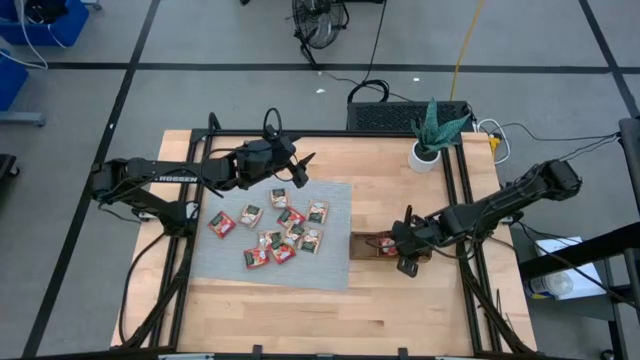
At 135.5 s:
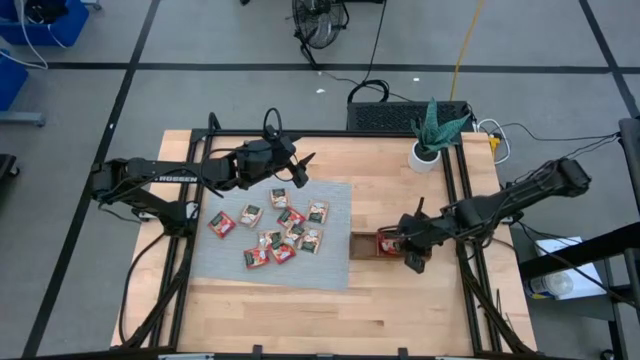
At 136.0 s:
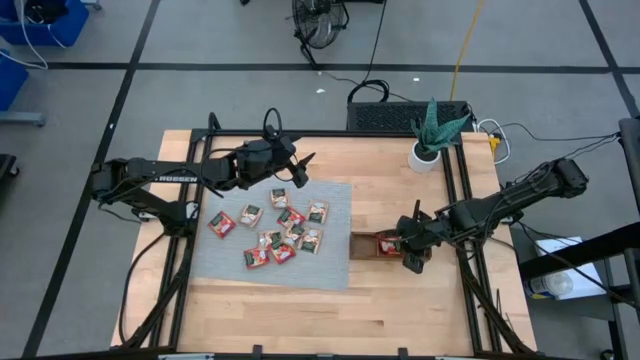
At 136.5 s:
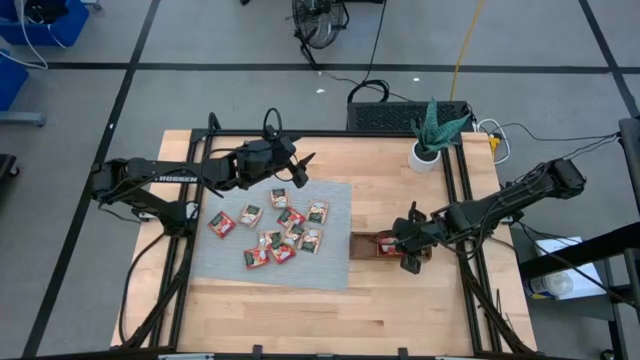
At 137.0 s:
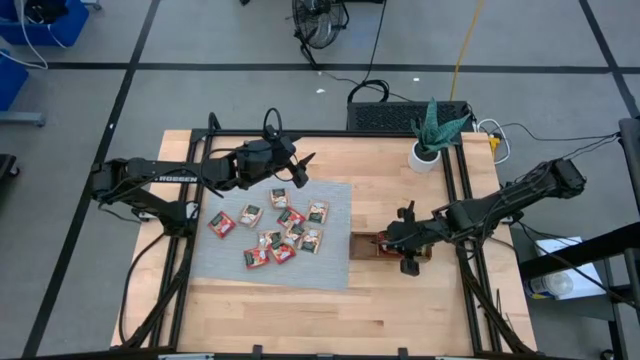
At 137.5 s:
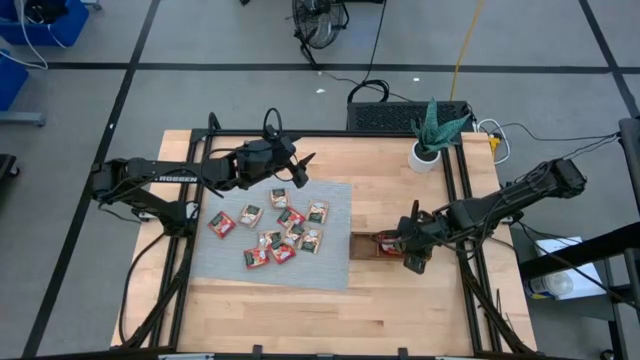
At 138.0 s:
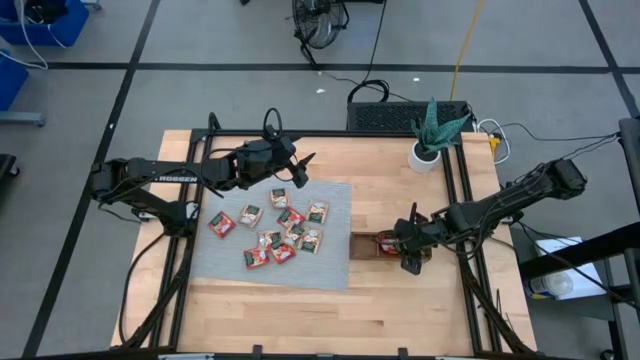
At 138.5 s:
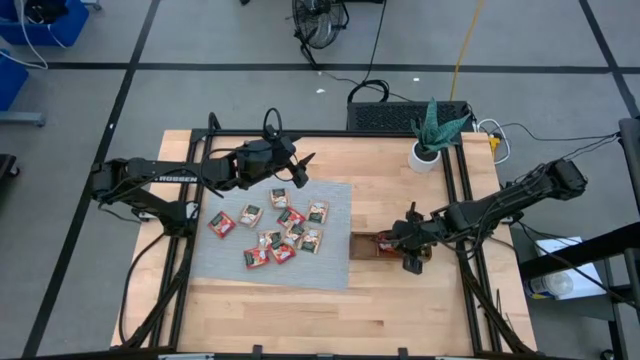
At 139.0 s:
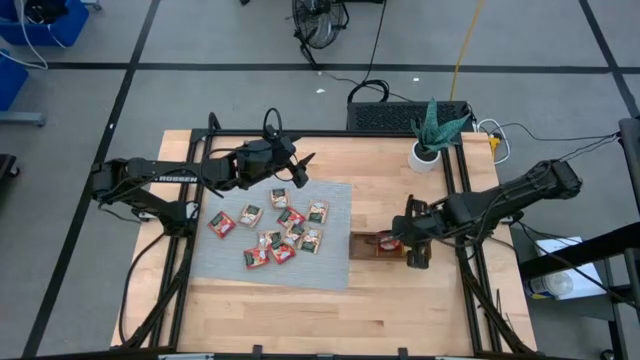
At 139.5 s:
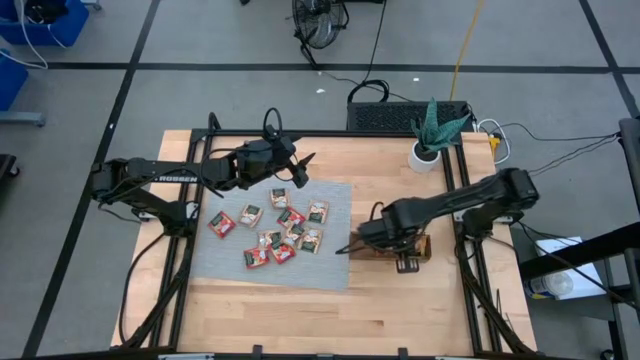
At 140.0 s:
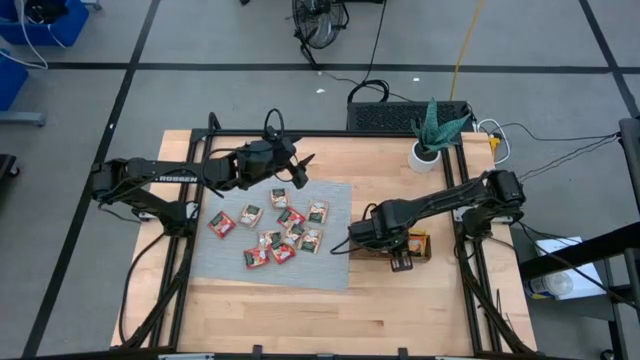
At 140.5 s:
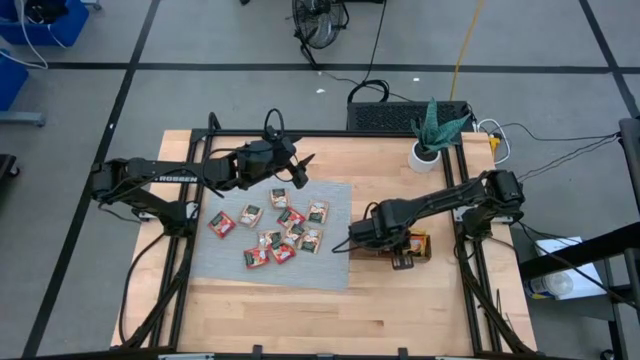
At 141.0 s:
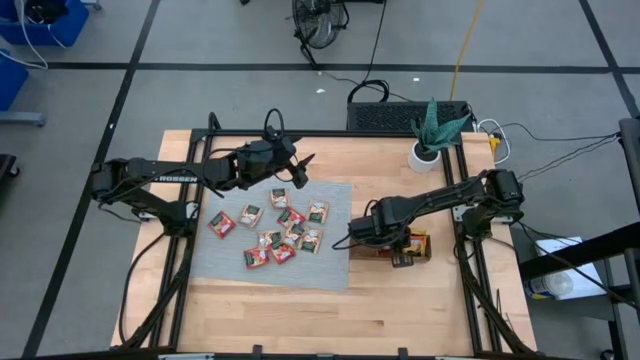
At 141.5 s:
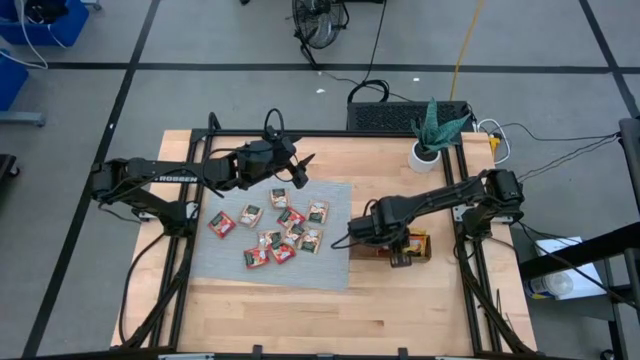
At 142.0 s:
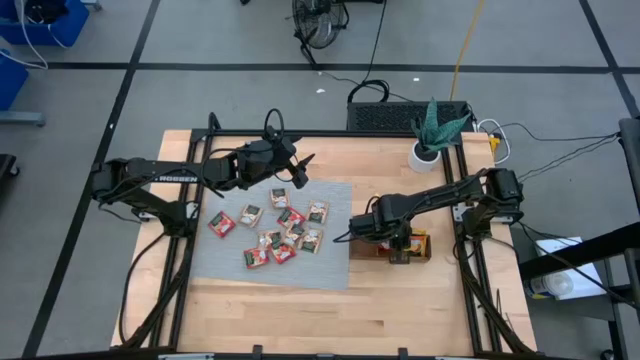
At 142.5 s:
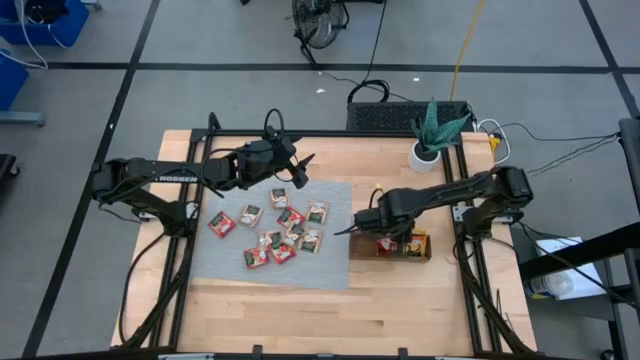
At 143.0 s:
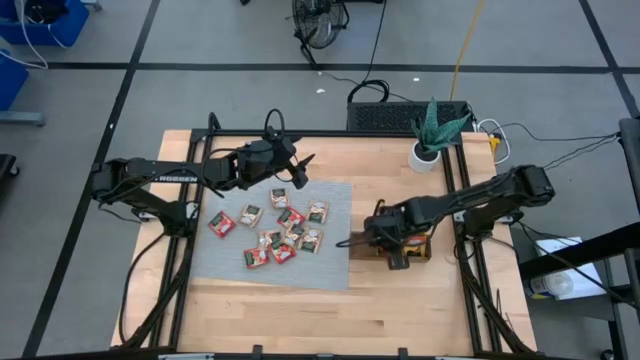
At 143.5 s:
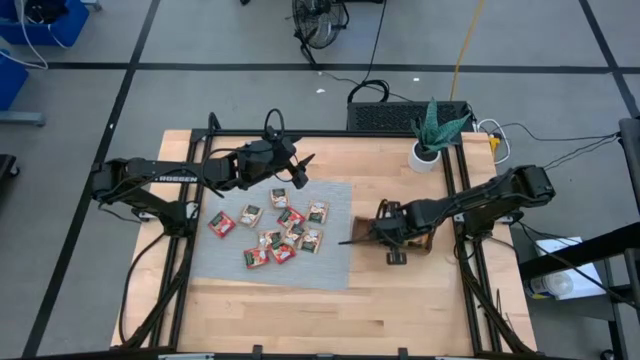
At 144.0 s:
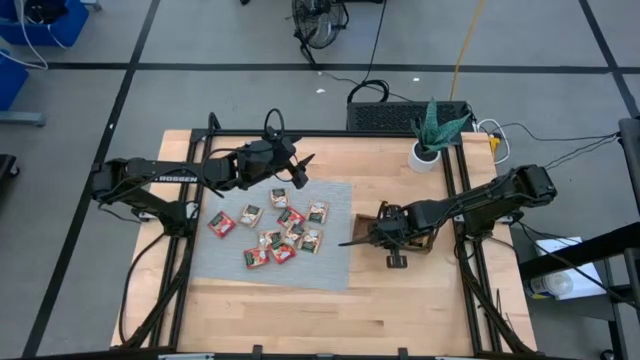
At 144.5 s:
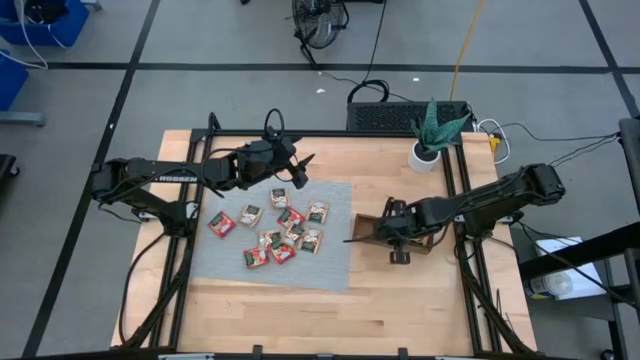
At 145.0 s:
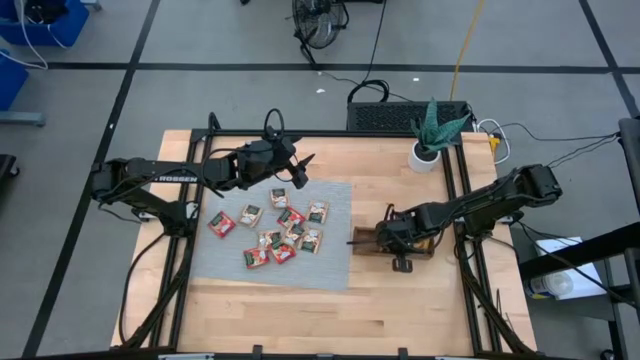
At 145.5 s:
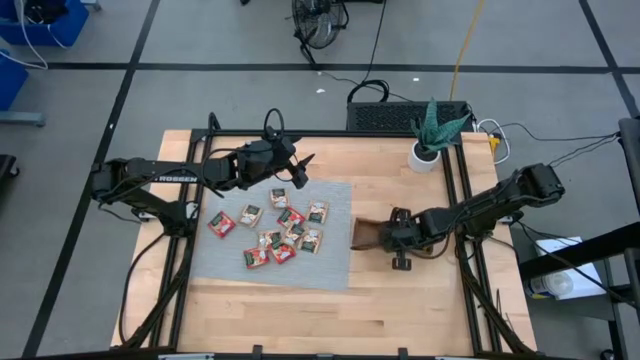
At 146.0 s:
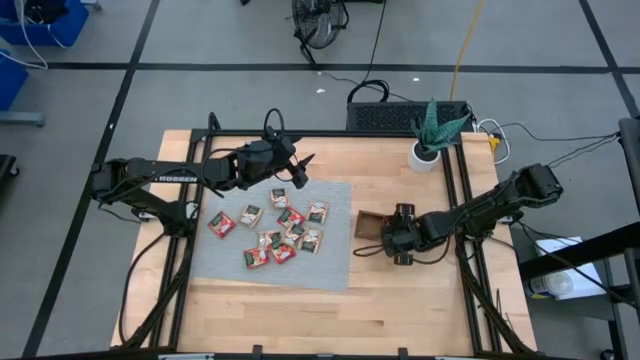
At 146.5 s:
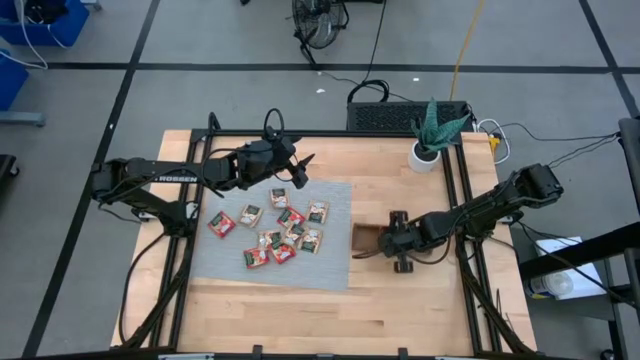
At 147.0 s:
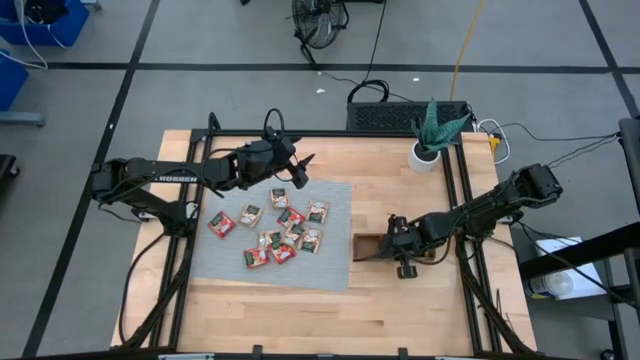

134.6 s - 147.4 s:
Task: Pick & Place Tea
Put the red tea bag into the middle section of the wooden organizer

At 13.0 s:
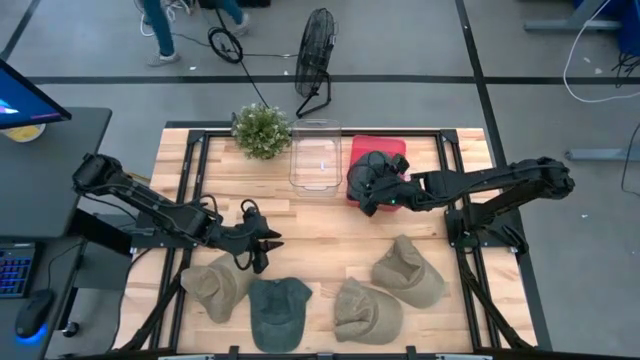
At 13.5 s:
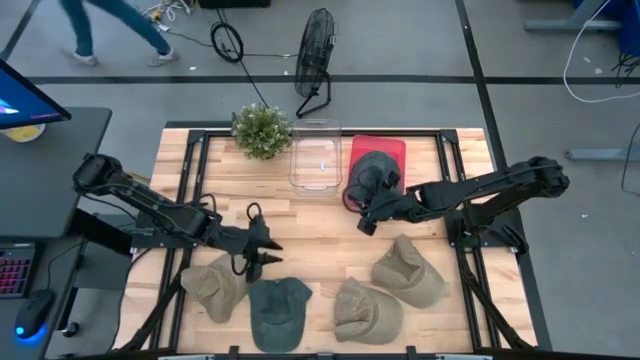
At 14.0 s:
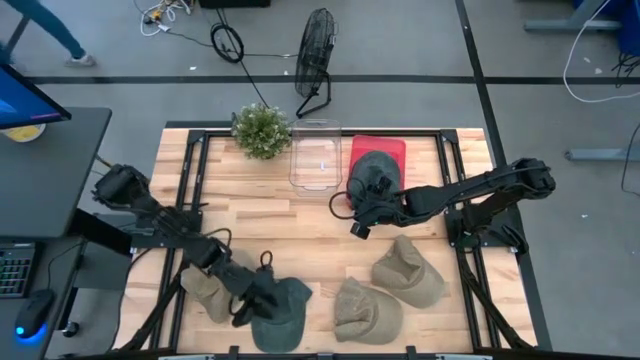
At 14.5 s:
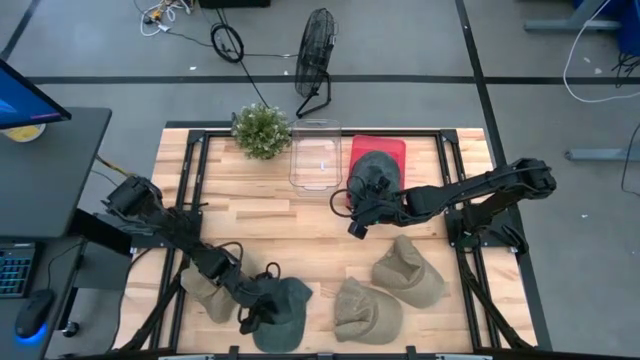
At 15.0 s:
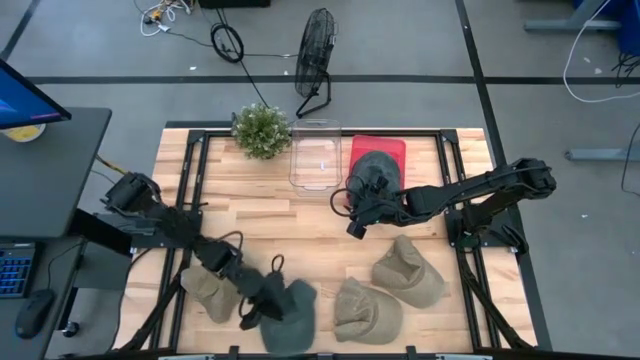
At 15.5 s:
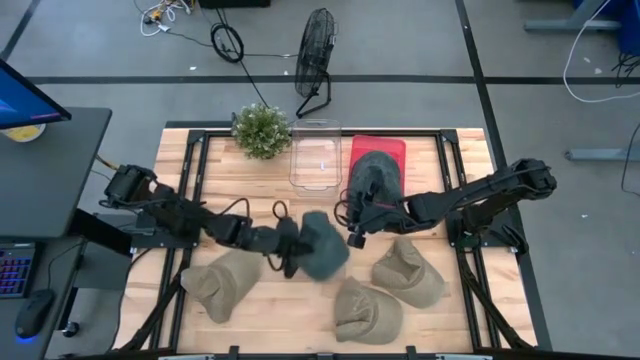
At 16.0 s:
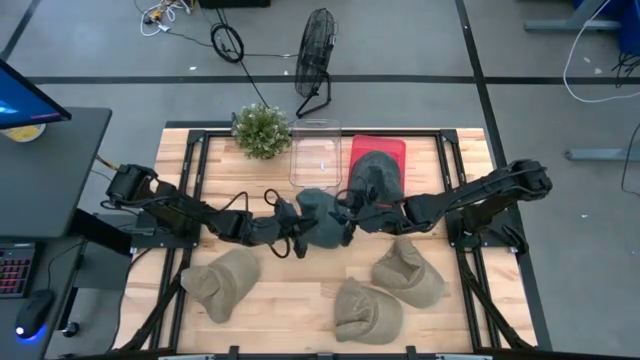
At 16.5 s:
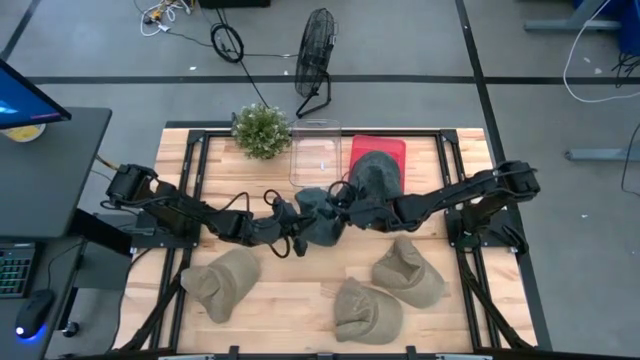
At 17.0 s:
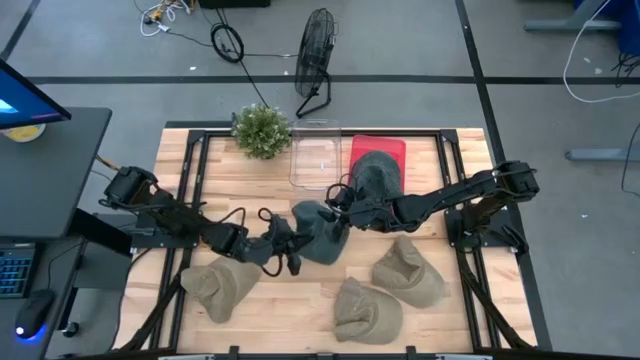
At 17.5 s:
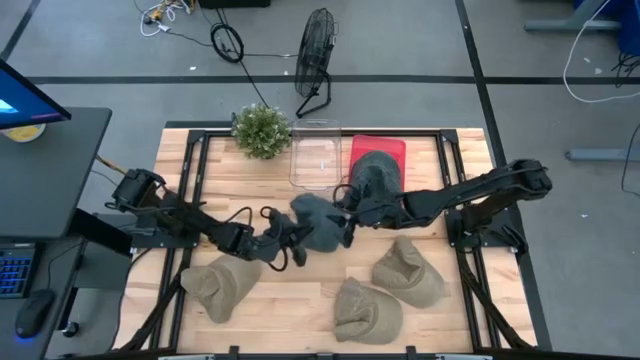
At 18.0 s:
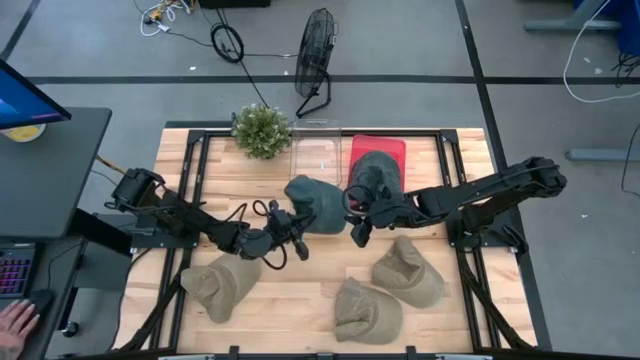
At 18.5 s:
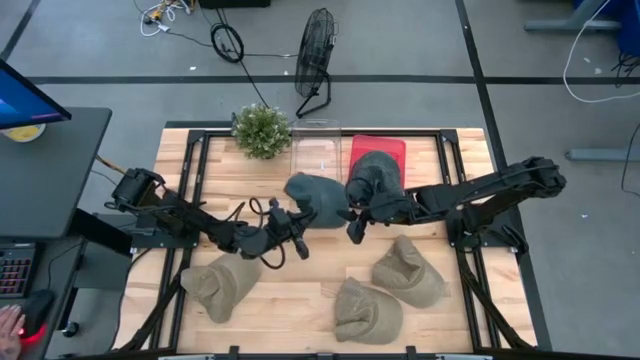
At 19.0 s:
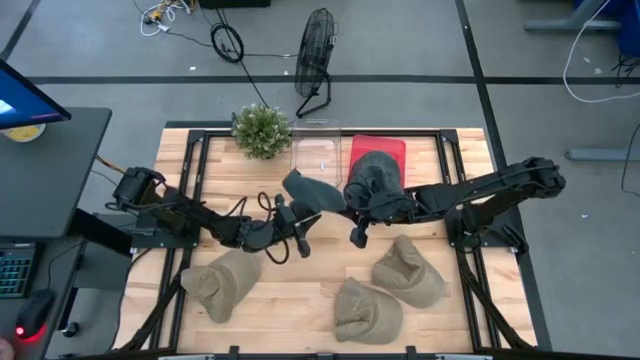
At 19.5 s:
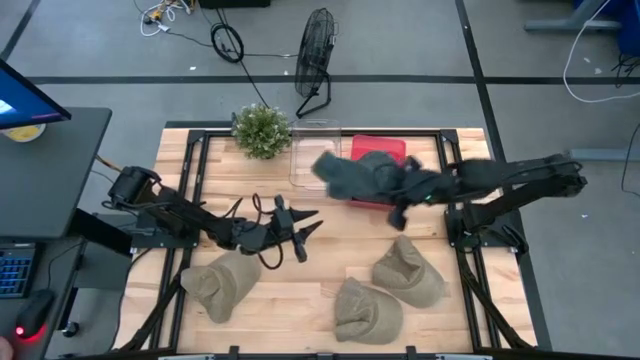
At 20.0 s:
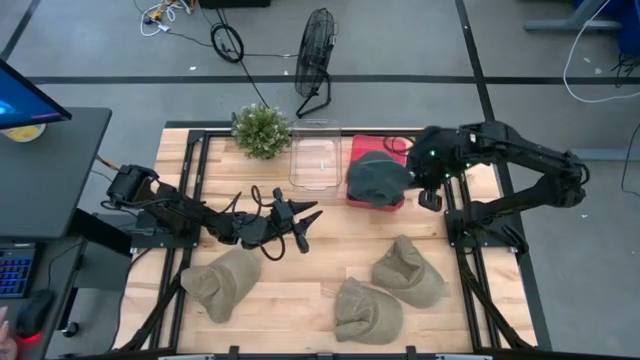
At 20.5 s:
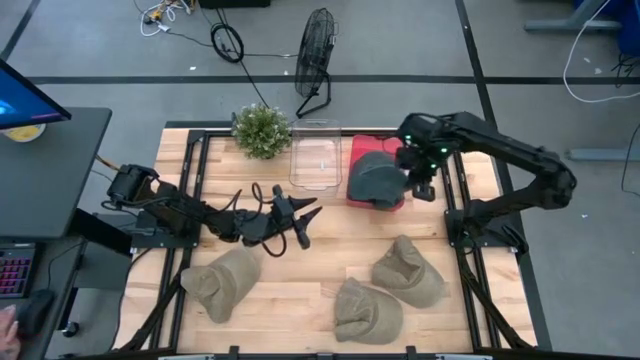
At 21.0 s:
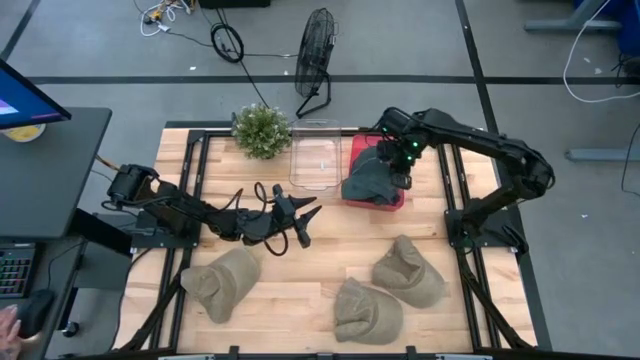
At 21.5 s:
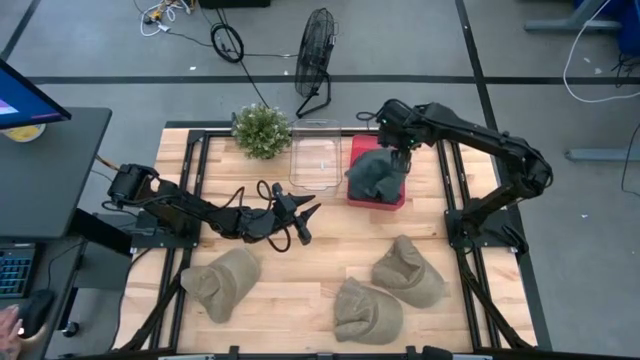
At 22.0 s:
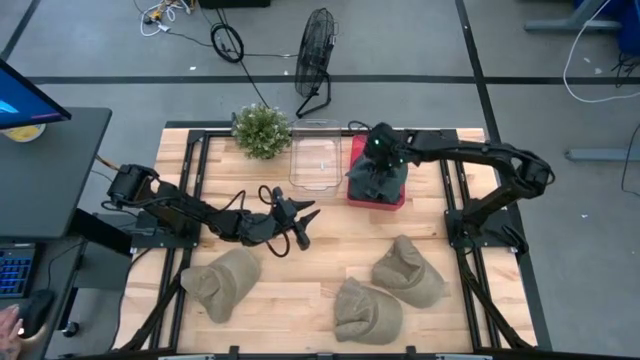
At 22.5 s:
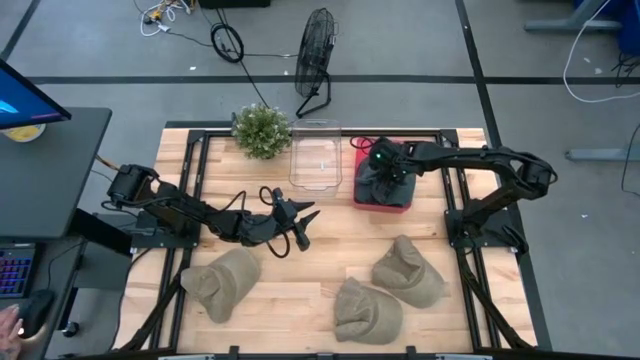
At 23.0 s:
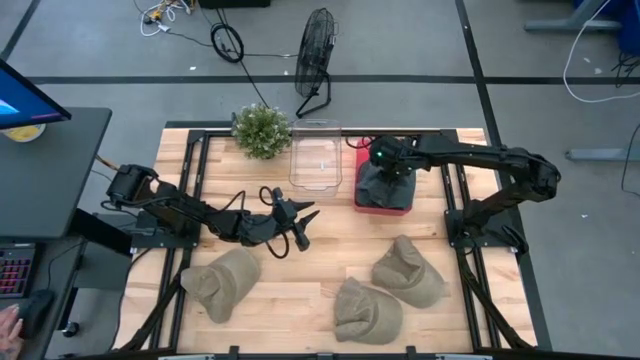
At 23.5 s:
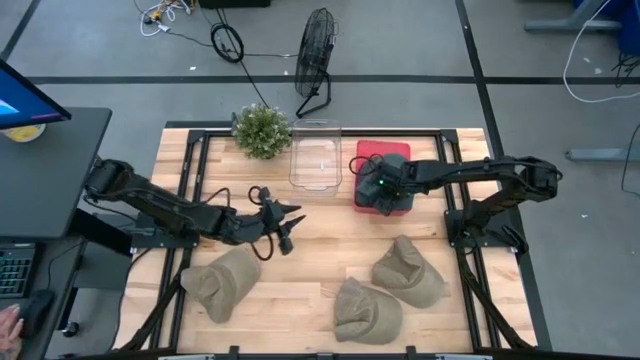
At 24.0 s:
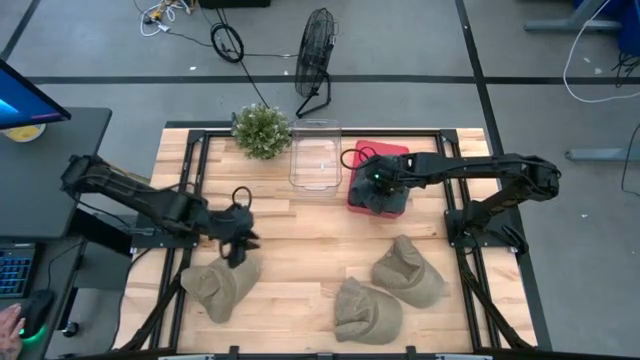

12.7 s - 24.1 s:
Task: Pick & Place hat
Put the black cap into the red bin
